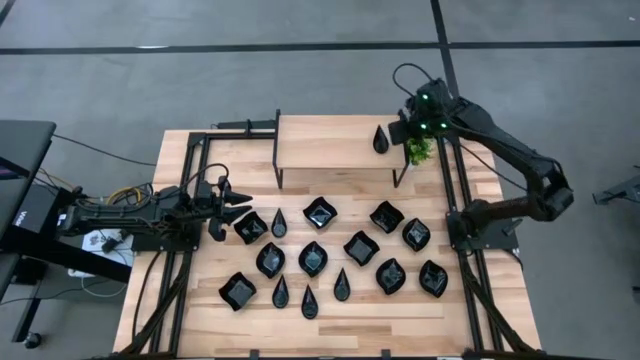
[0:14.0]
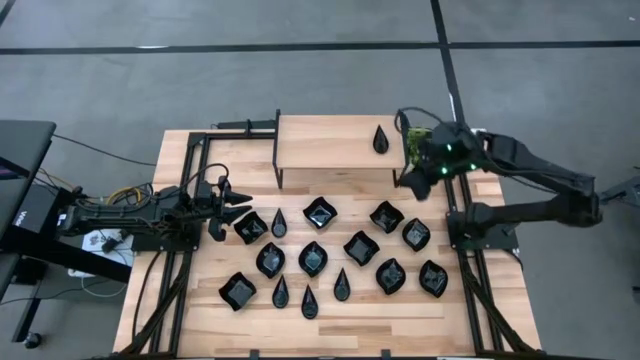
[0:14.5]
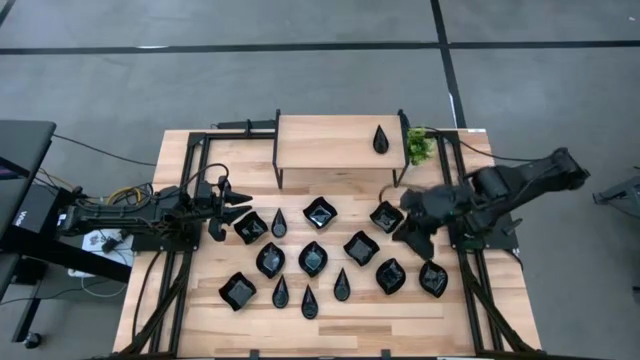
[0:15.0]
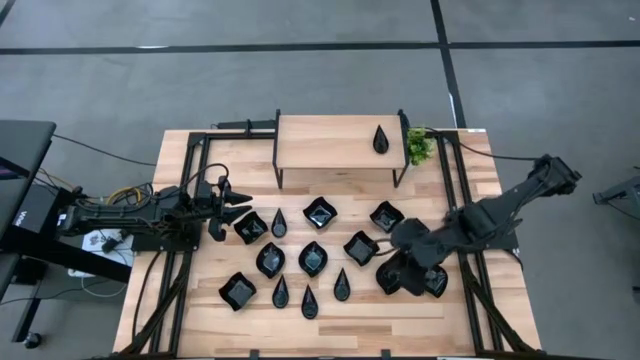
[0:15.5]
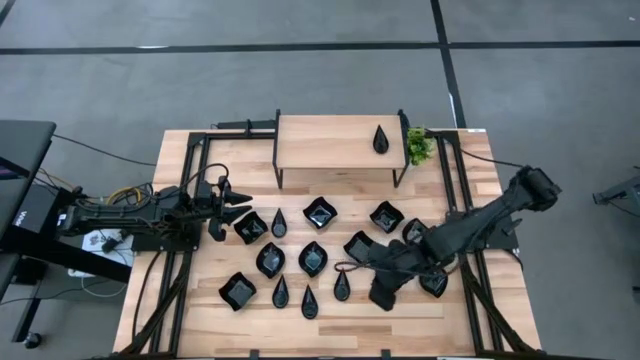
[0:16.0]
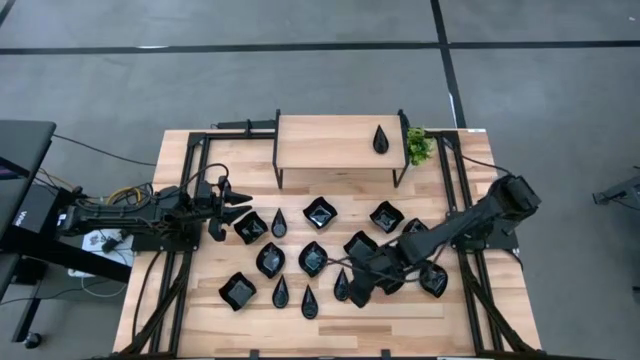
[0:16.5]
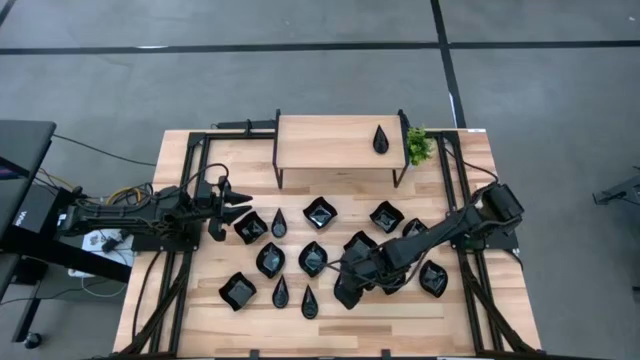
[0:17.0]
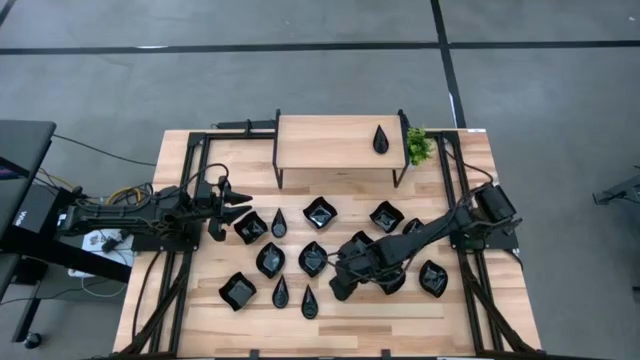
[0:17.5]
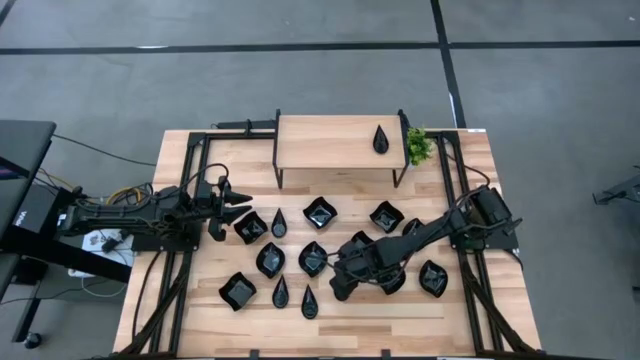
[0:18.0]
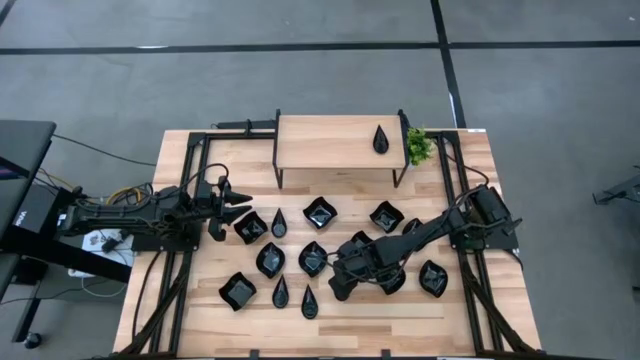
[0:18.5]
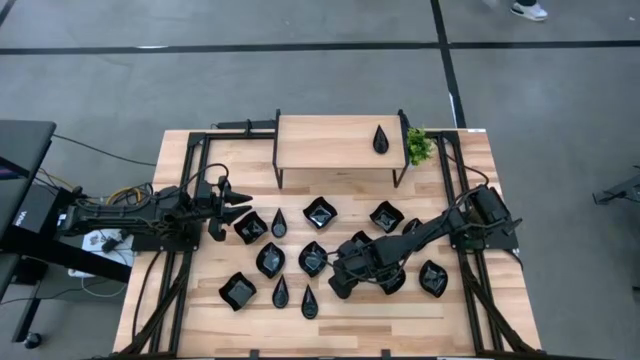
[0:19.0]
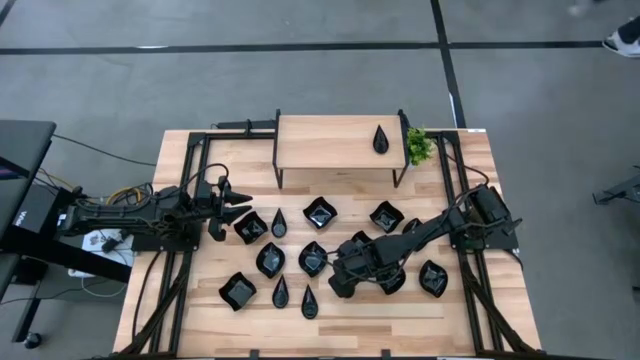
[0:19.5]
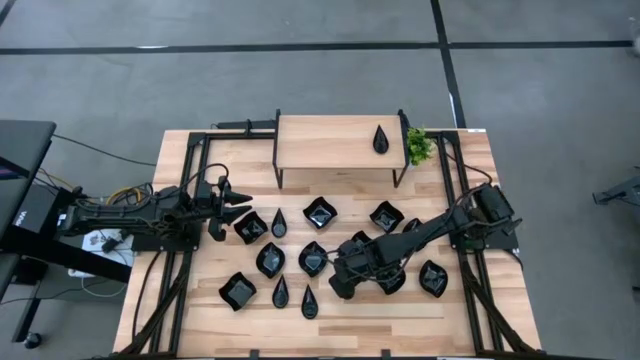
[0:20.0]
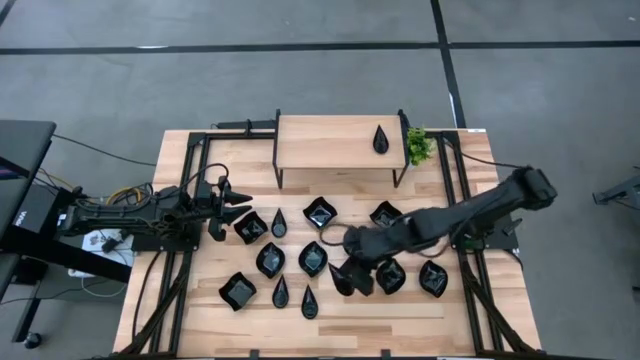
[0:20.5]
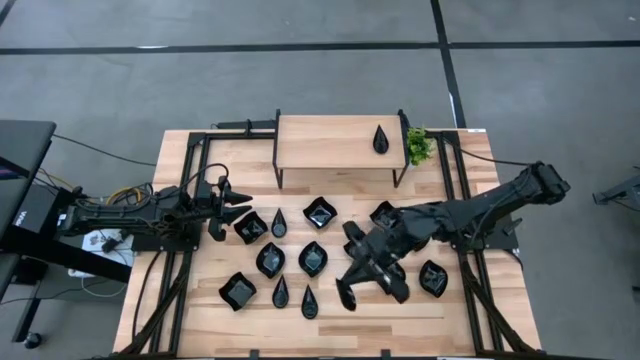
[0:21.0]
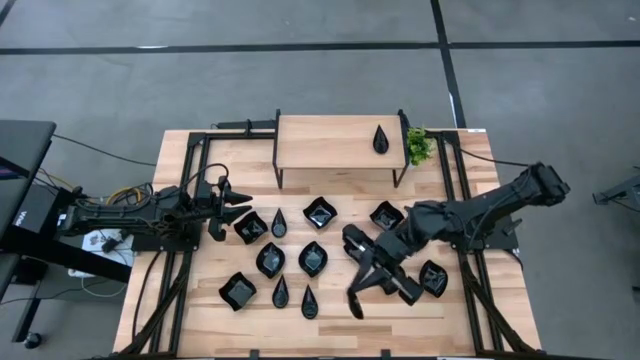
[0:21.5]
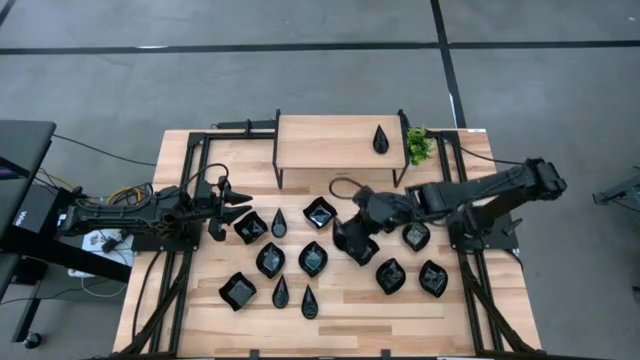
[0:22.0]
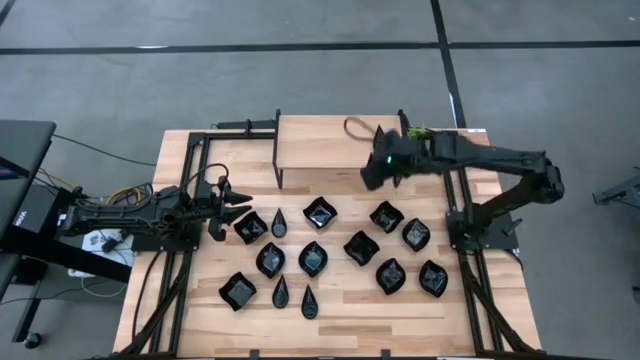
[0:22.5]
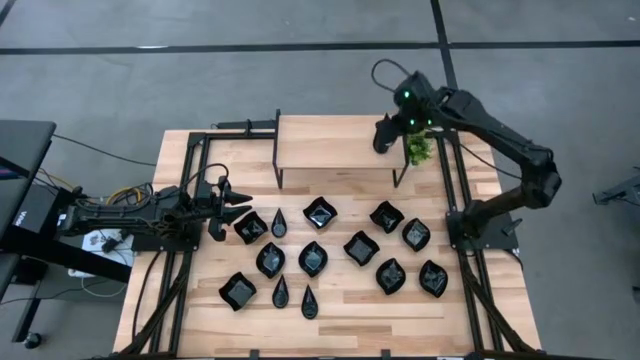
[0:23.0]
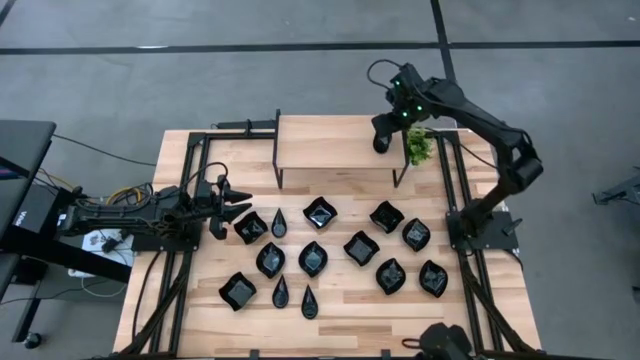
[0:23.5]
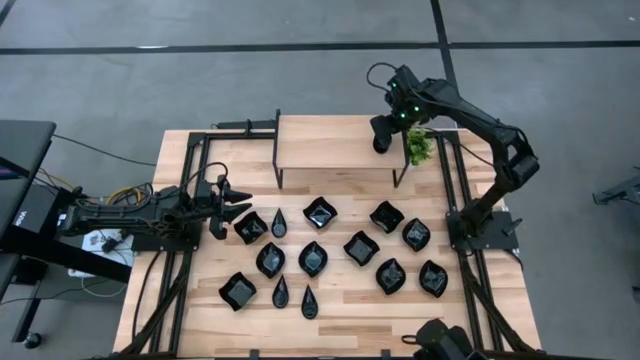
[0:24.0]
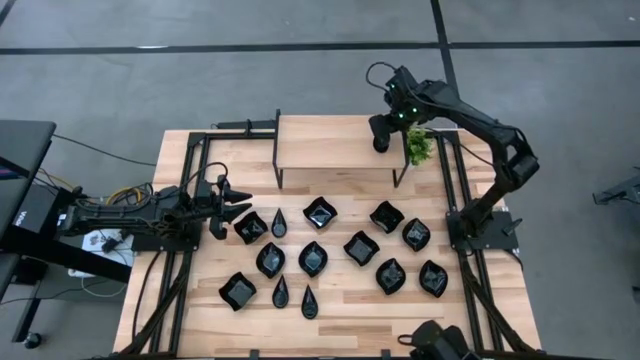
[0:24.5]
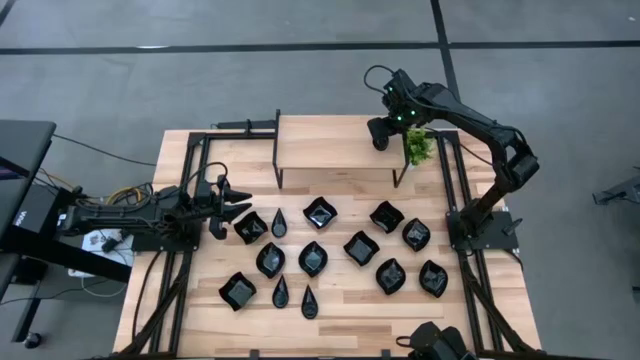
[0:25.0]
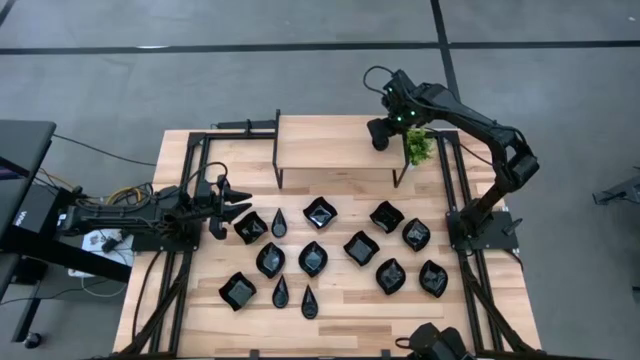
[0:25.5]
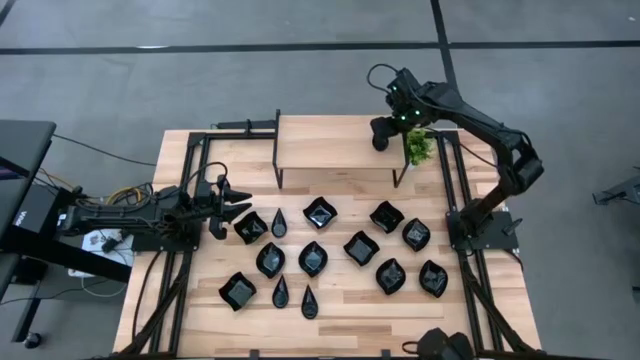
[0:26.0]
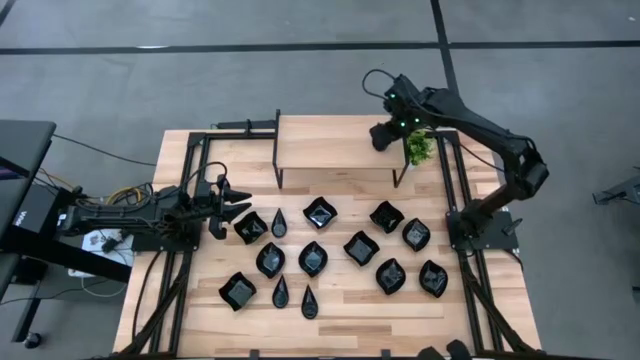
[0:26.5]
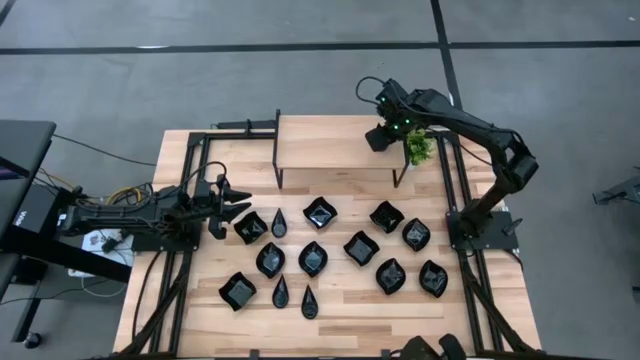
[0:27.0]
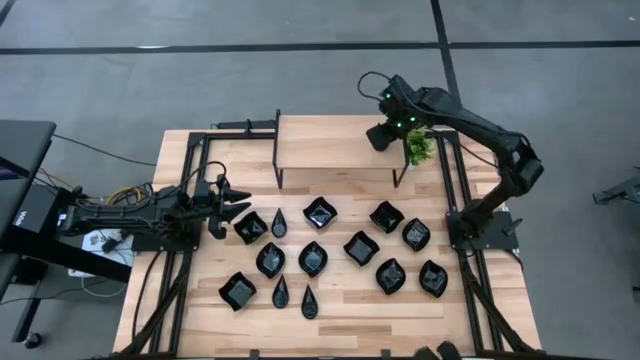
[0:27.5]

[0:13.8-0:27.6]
Task: Pick & Place Mini shaped plates
Stack the drop-shaped plate on top of the other drop-shaped plate on the shelf

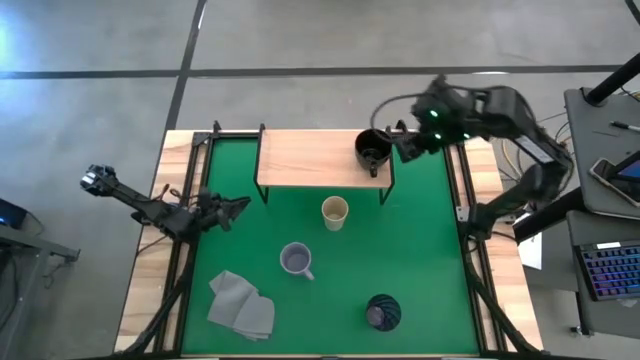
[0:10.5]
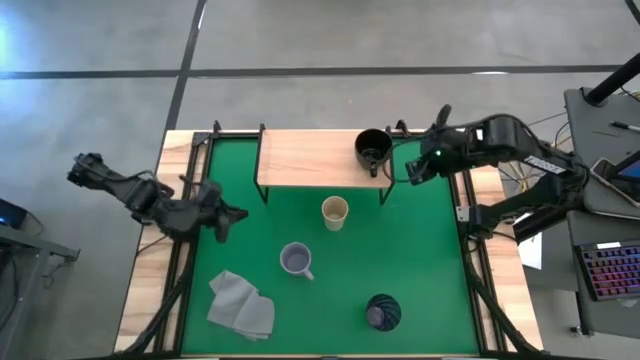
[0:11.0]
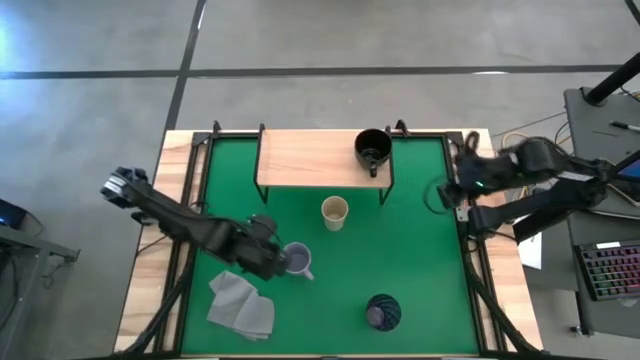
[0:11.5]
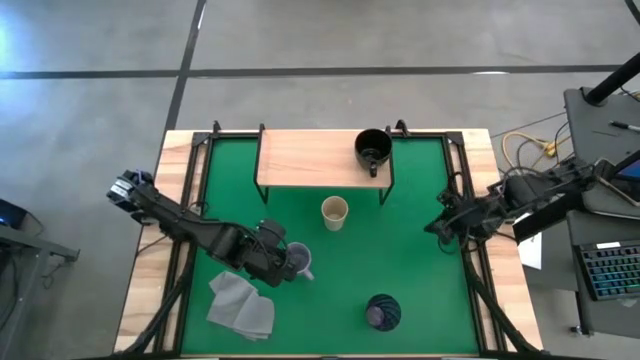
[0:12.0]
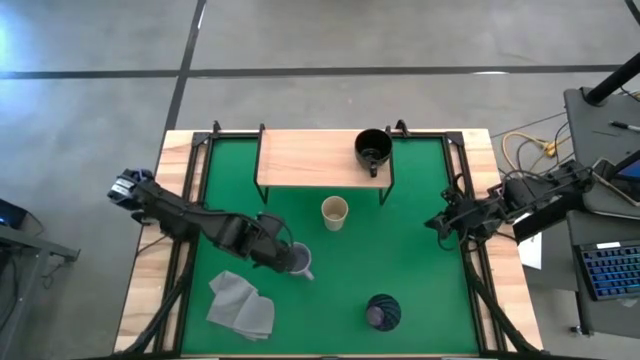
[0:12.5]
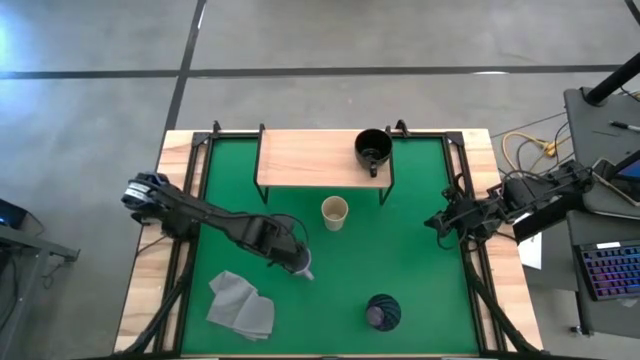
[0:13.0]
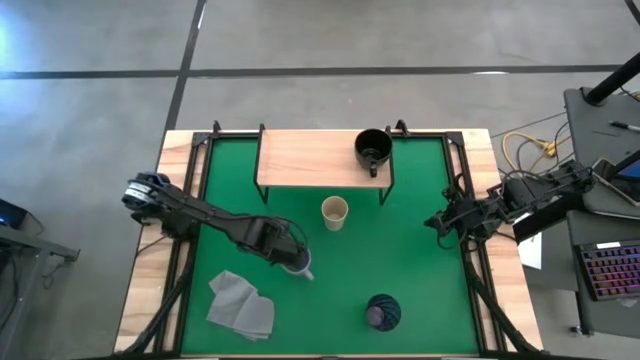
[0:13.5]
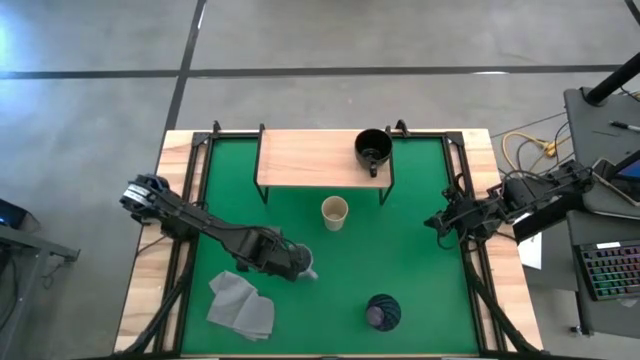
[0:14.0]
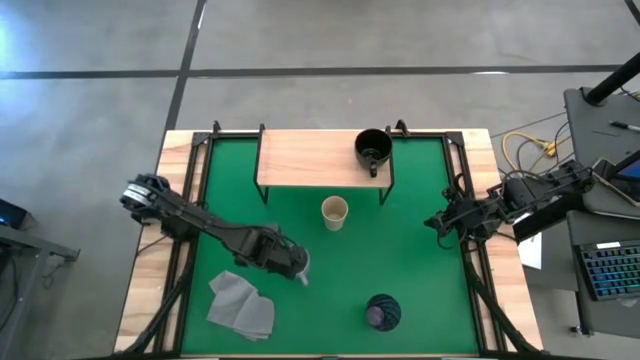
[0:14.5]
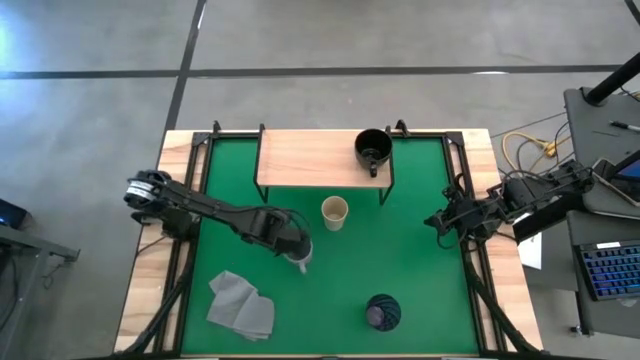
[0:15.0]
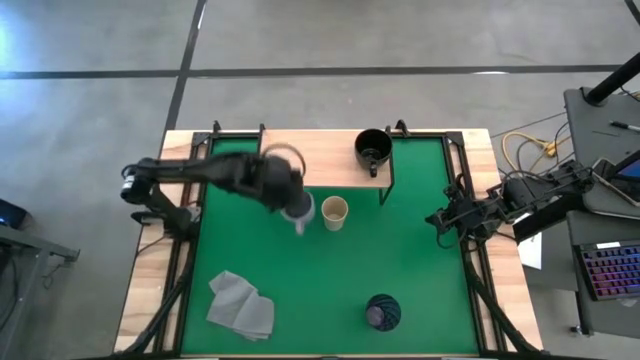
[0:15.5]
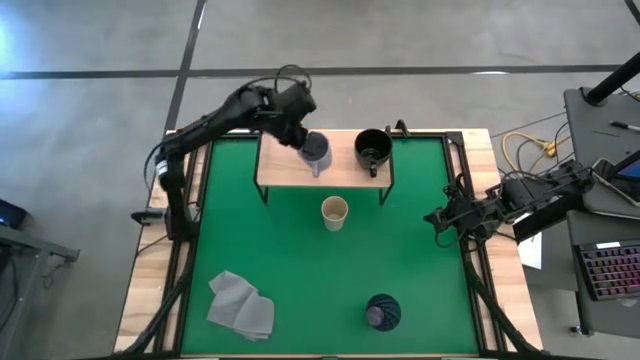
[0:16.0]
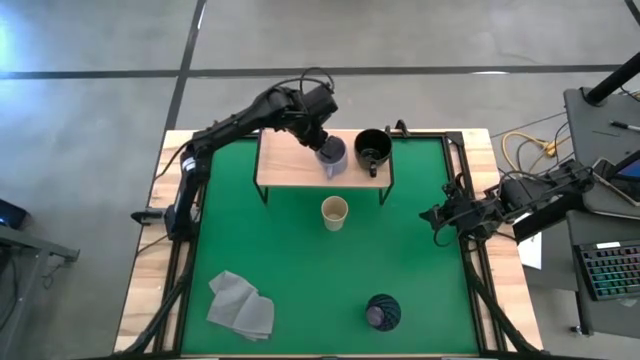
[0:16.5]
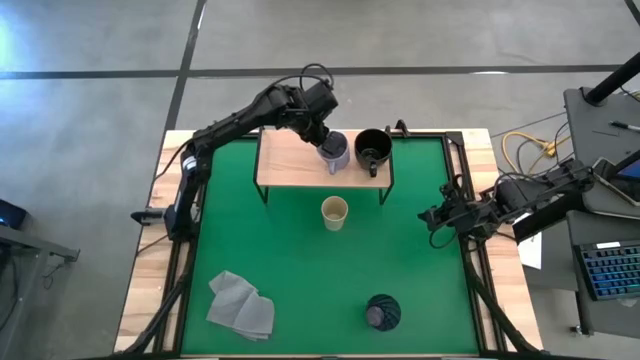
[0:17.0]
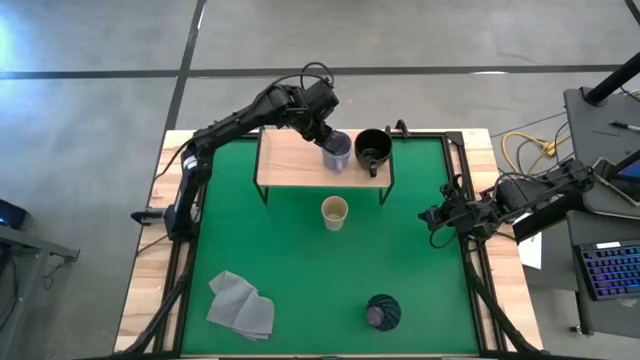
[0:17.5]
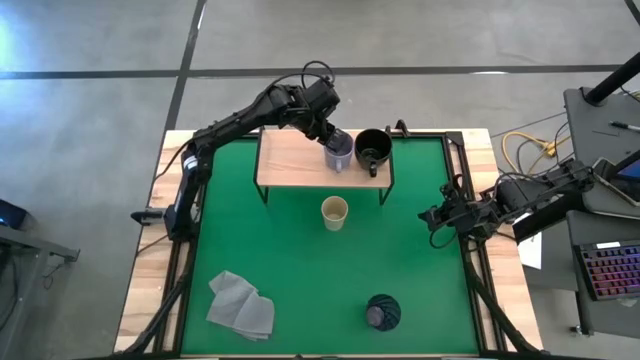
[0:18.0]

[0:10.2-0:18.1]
Task: Stack small to large cups/mugs on shelf
Put the purple mug on the shelf
